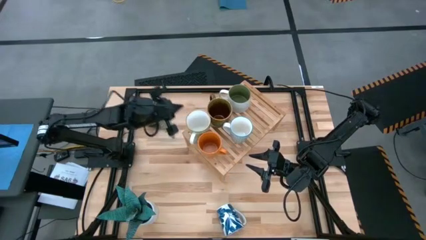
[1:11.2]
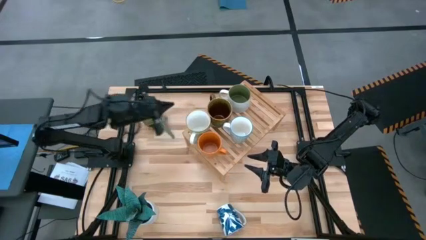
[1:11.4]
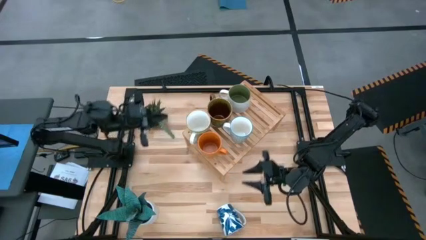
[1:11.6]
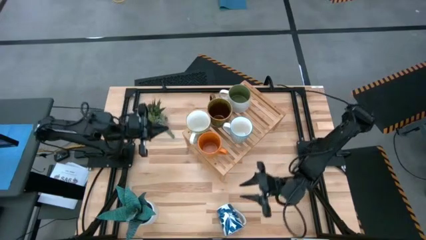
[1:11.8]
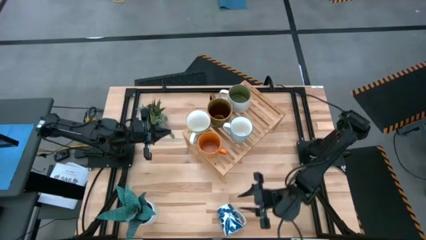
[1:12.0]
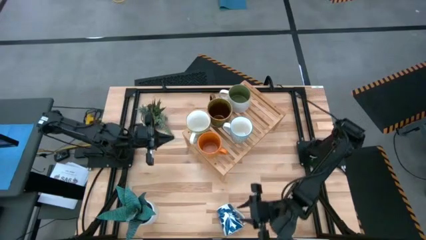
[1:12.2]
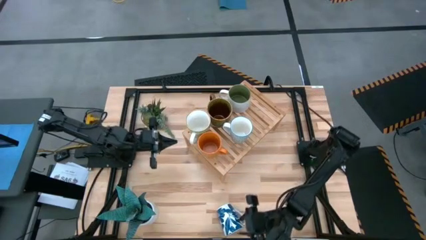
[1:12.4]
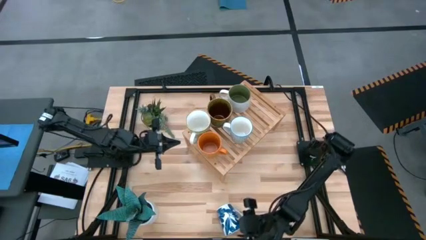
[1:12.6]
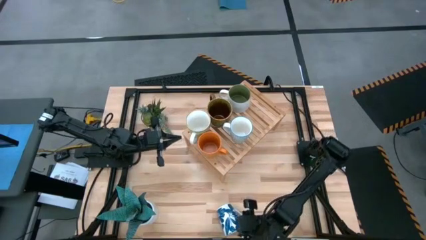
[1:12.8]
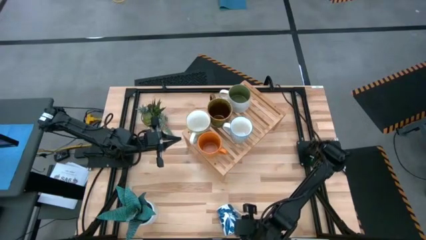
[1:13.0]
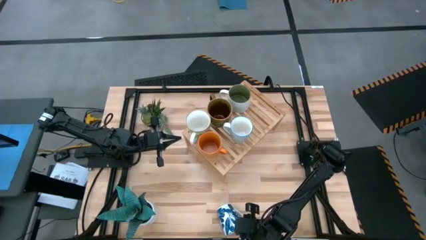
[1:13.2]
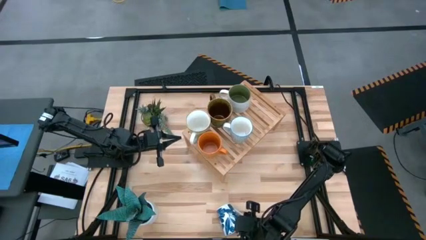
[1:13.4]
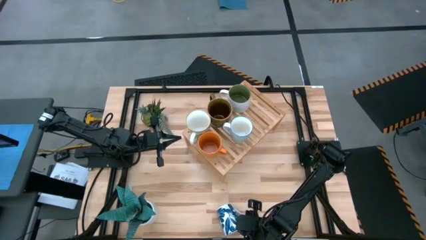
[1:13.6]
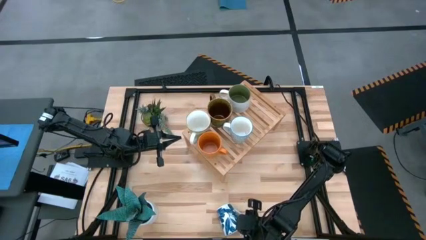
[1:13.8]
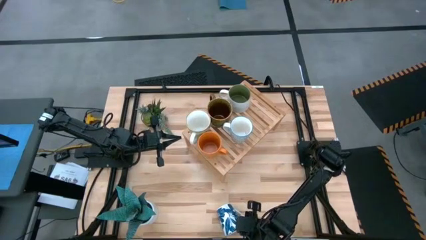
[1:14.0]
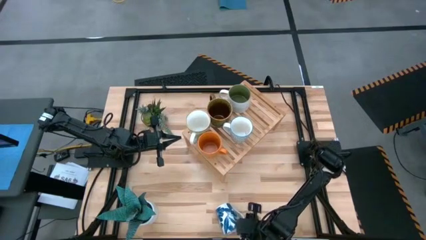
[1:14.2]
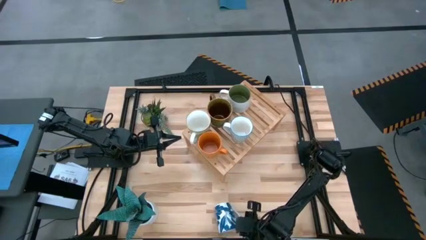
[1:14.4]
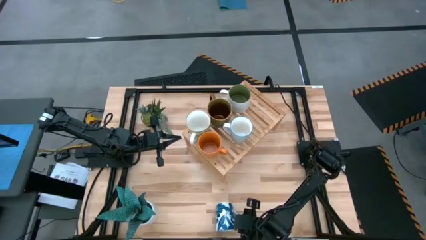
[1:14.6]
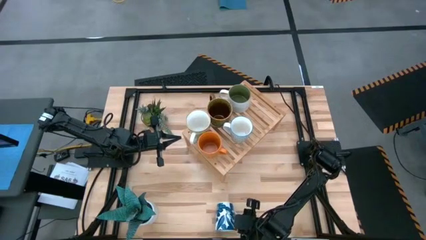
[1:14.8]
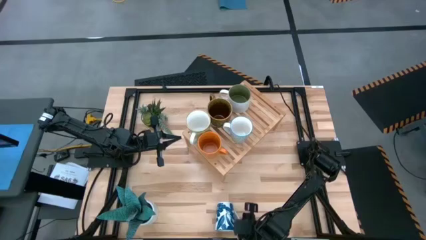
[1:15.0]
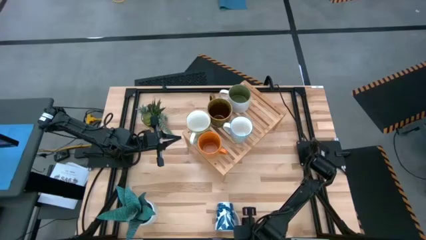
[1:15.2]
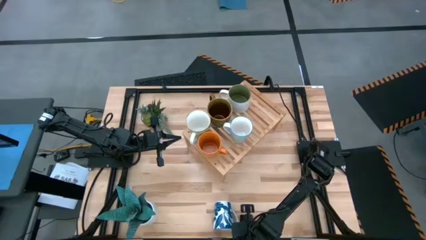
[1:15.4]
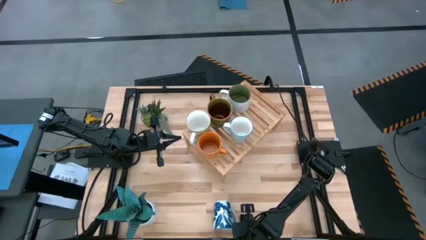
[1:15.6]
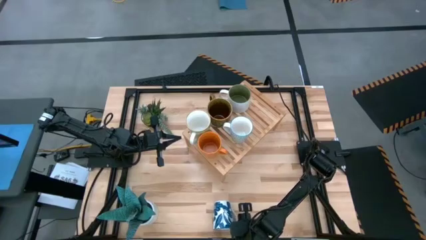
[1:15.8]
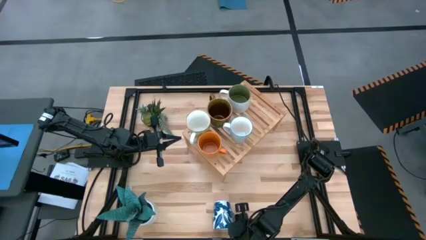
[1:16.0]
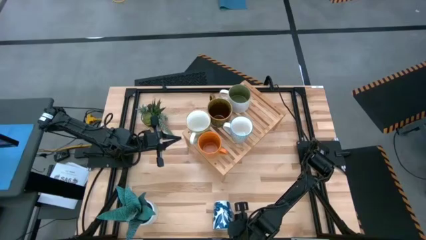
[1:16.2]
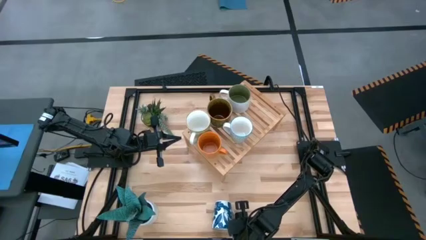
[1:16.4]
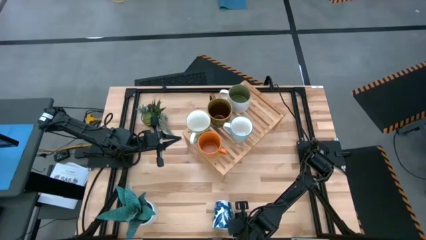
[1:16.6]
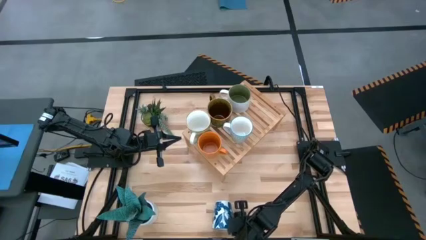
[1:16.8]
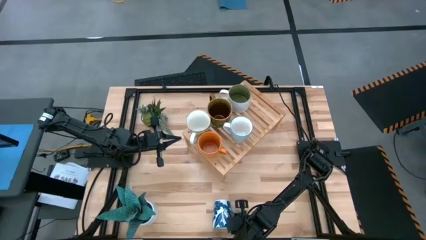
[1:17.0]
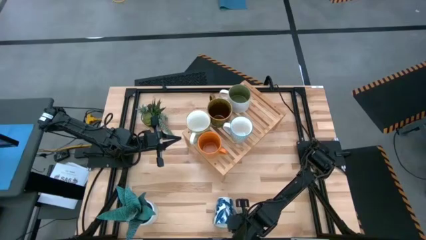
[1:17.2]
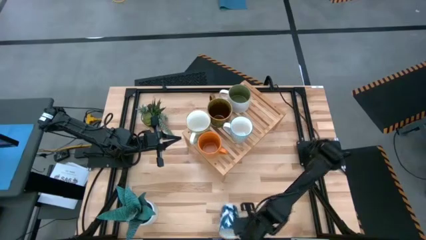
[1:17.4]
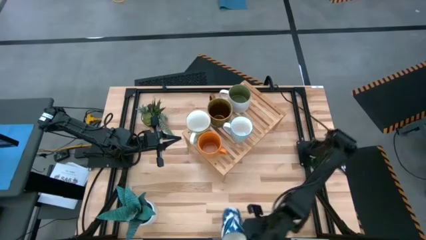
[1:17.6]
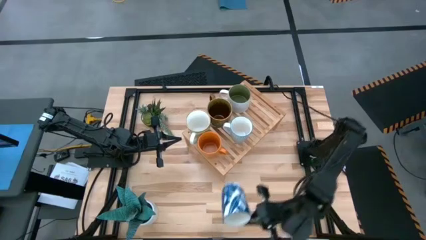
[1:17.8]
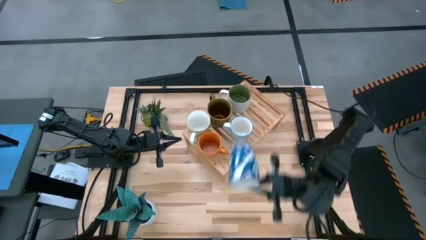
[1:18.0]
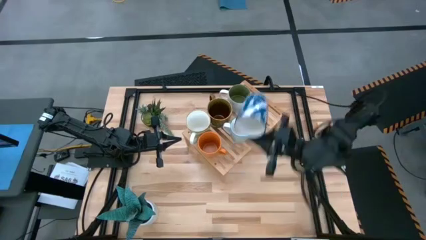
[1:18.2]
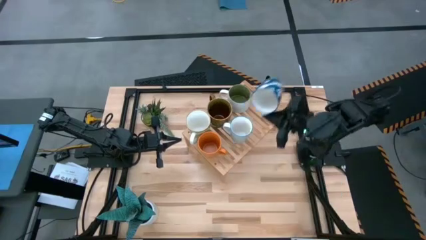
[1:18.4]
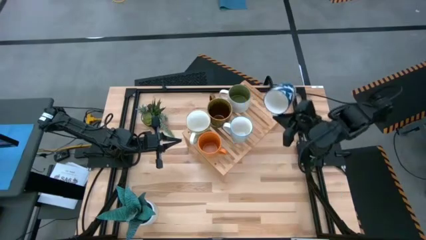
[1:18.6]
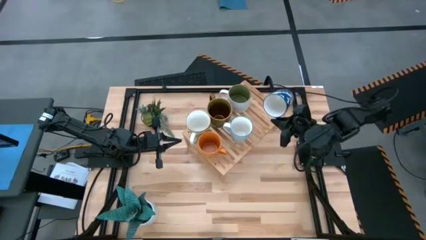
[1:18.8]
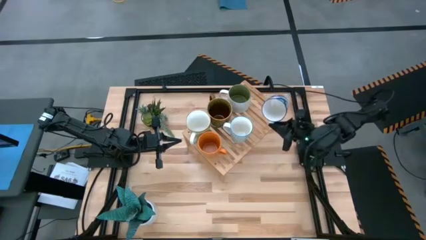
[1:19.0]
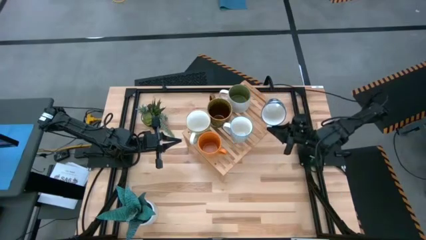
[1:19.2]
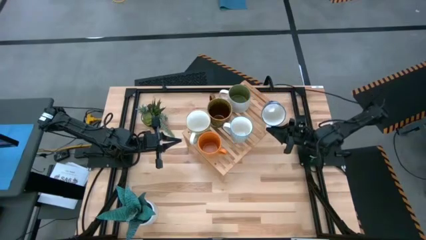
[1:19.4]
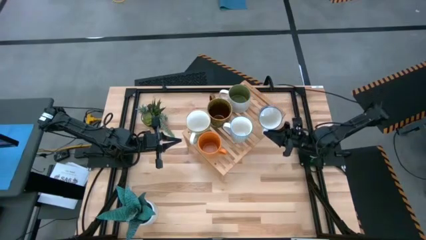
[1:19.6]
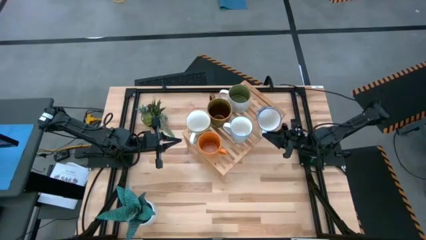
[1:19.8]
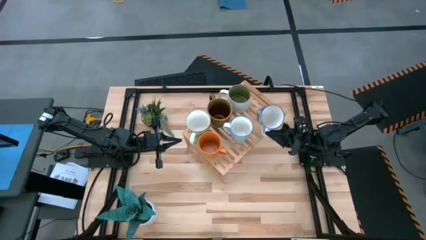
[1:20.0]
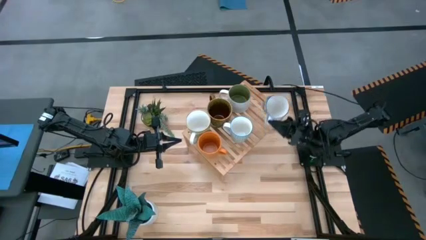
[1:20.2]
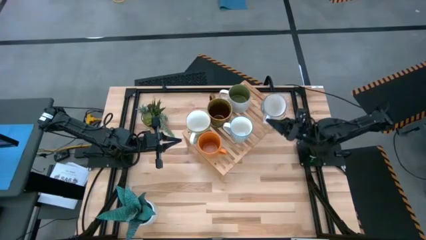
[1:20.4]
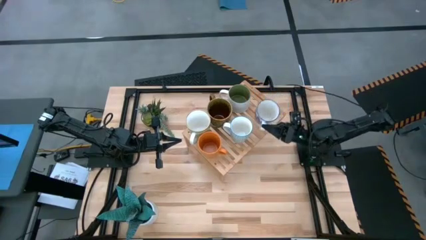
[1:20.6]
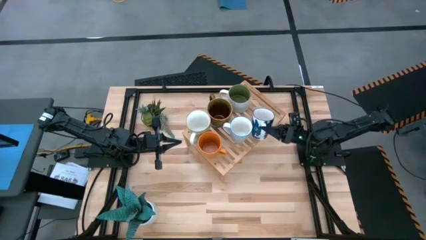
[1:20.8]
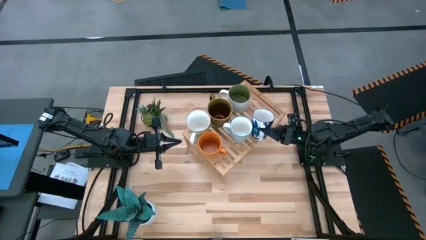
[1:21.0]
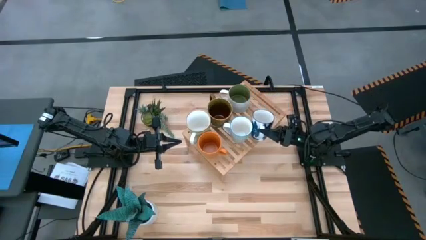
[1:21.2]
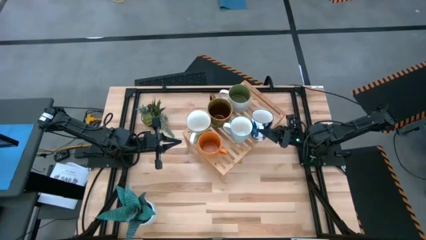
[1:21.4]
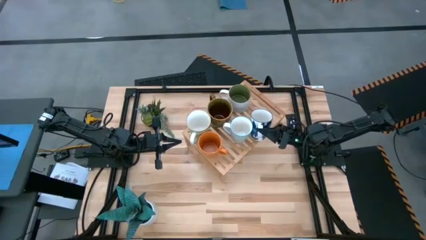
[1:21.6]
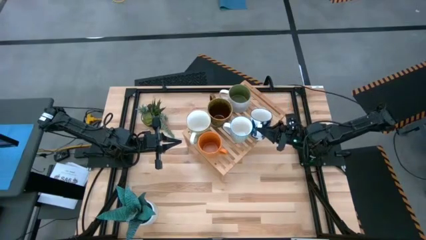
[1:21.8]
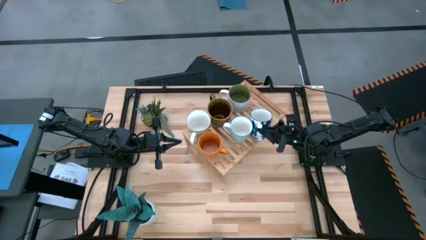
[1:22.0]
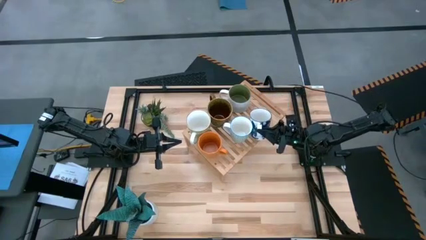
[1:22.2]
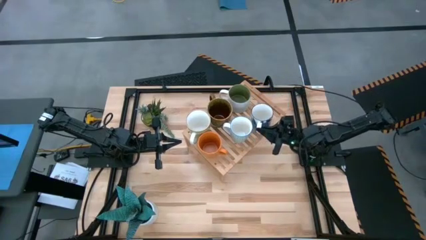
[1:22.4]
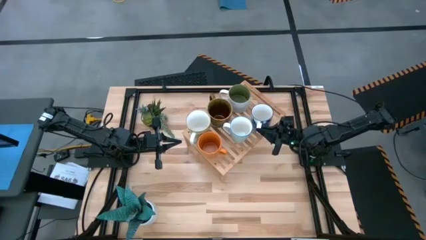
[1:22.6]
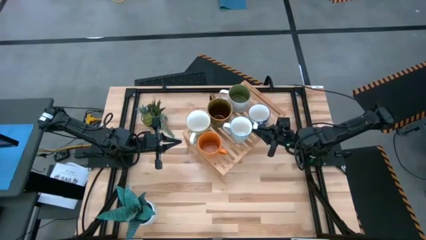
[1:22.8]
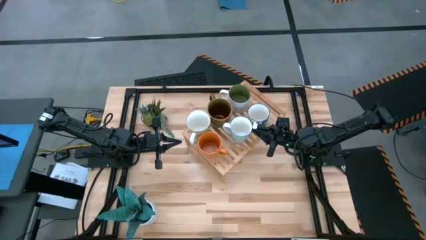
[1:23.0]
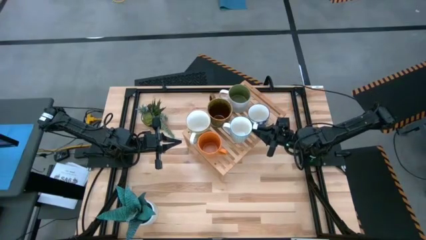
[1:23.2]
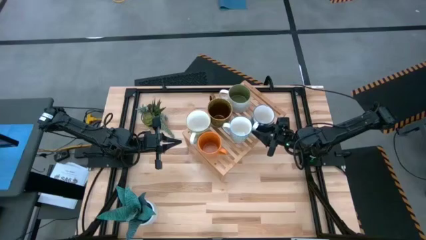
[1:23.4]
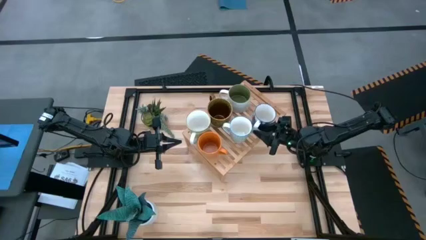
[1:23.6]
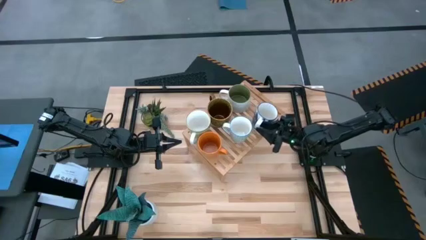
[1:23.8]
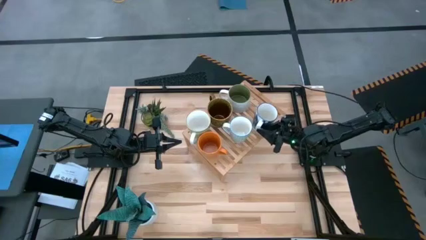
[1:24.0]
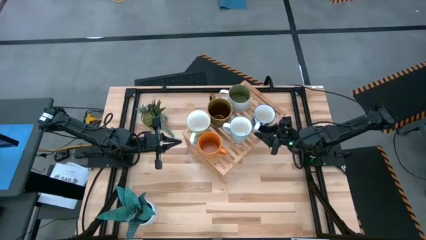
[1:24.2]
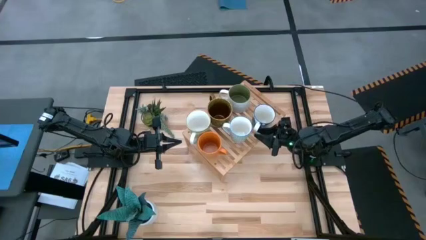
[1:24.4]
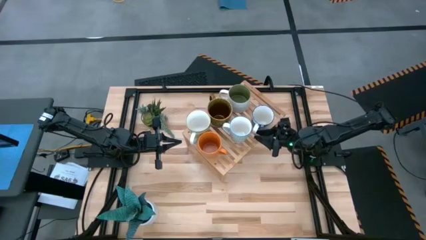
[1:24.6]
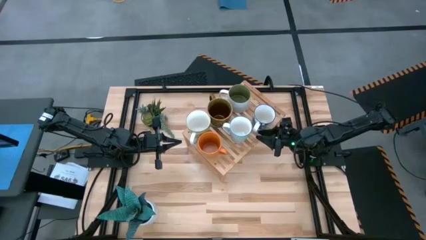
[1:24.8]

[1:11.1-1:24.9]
Task: Place coffee mugs
Put the blue mug on the shelf

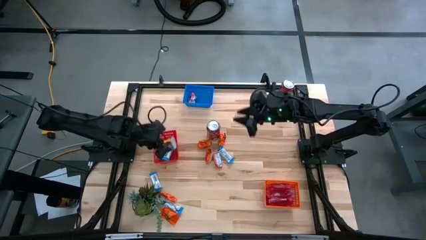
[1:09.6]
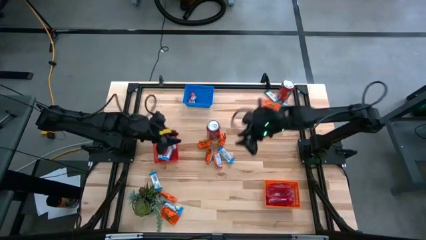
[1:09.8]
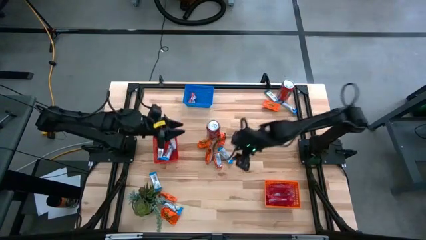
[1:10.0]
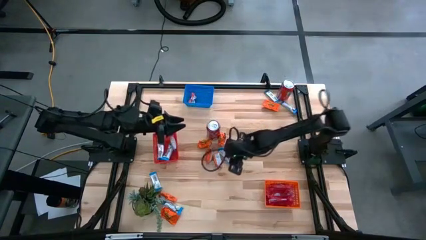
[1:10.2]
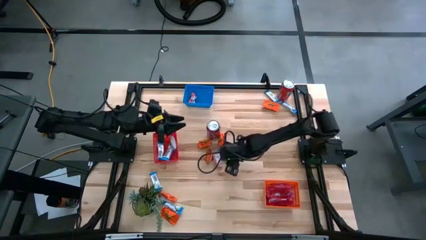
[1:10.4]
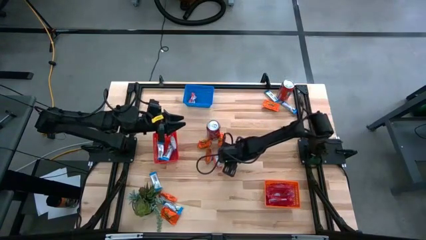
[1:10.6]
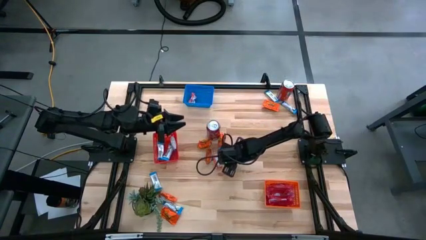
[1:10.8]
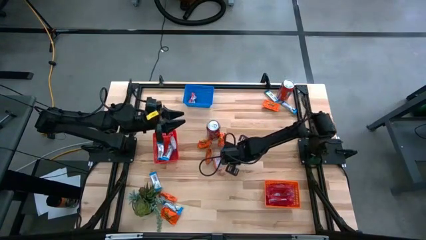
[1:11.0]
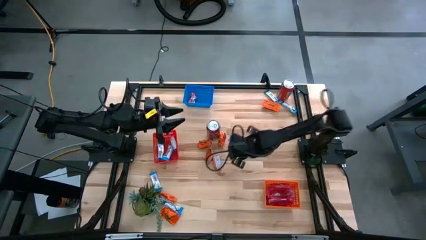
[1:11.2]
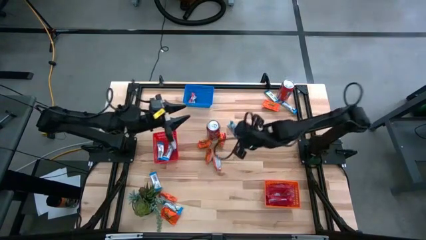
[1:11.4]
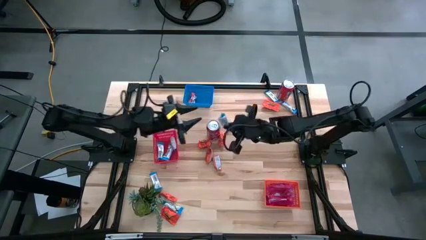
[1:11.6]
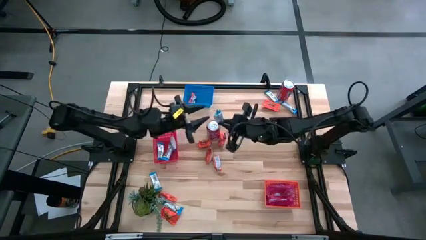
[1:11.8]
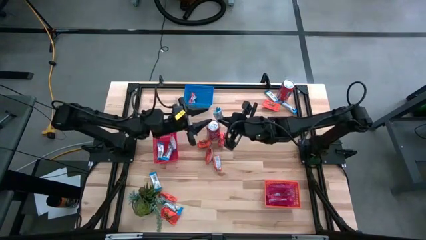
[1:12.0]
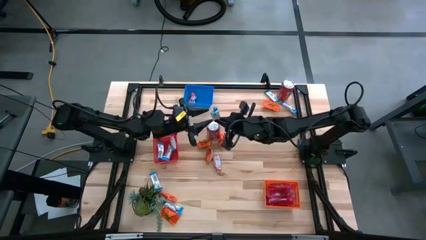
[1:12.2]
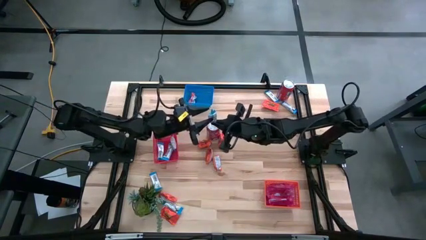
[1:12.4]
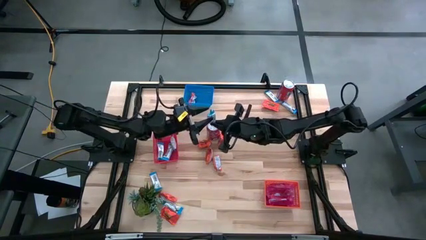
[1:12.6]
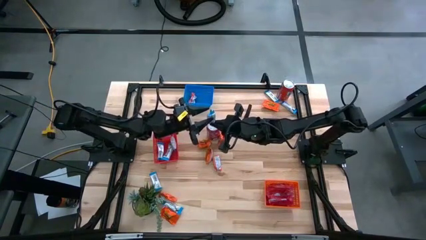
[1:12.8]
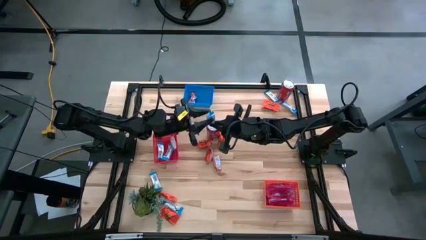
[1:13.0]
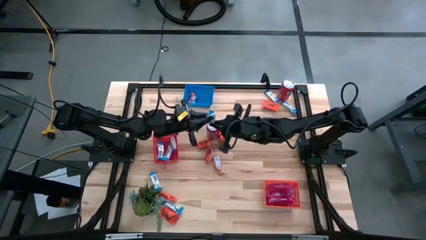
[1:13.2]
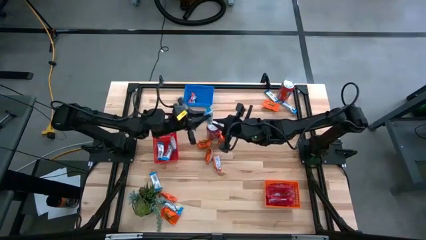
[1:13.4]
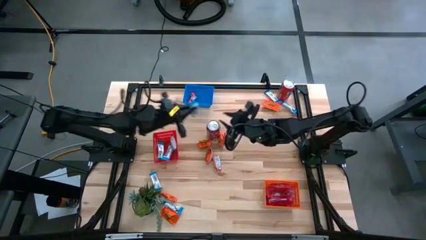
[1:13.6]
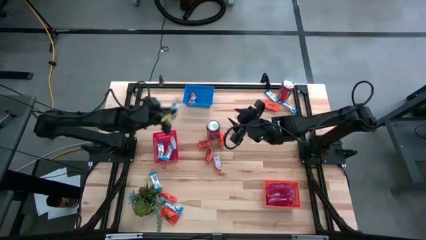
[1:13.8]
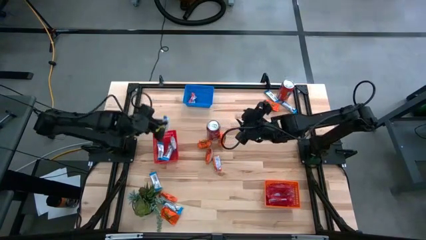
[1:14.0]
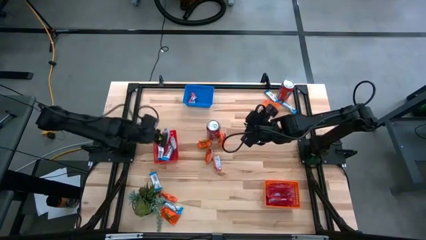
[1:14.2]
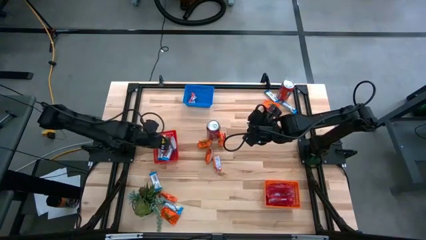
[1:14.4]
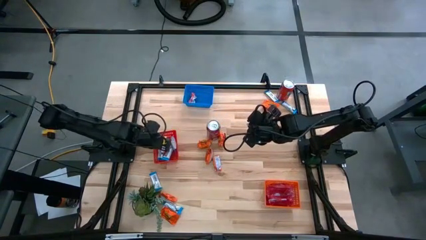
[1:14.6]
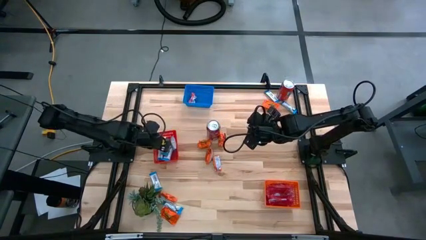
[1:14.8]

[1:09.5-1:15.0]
Task: Sort candy
Put the white chocolate into the red bin
